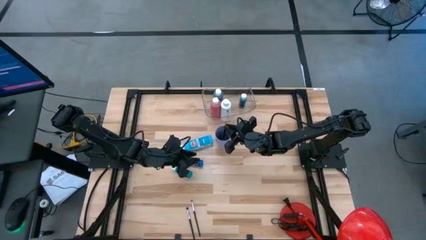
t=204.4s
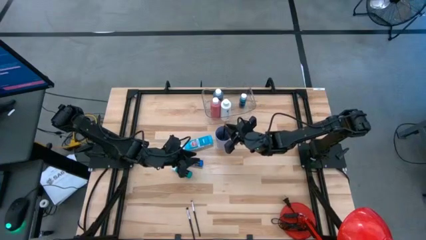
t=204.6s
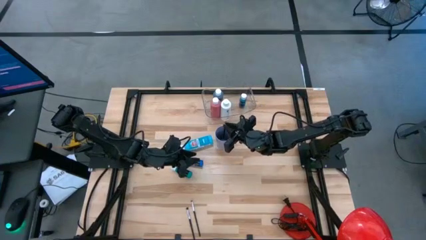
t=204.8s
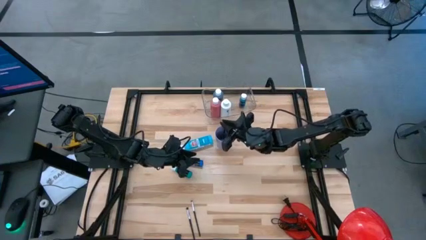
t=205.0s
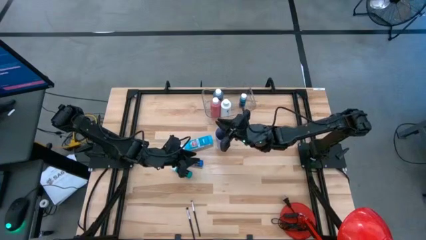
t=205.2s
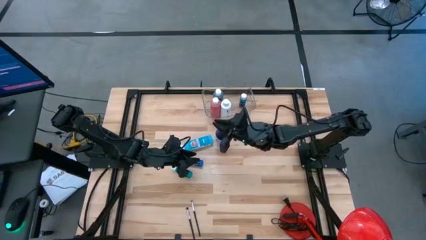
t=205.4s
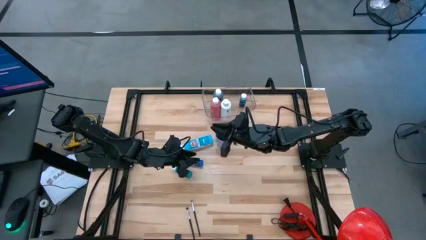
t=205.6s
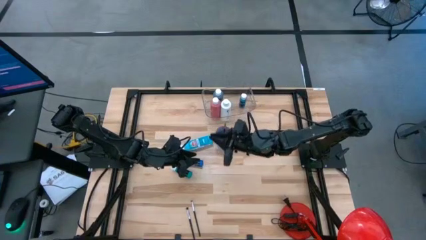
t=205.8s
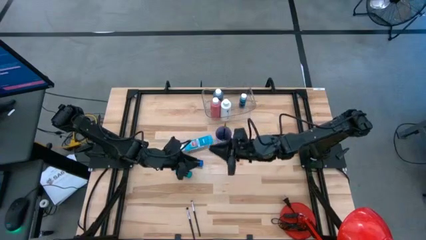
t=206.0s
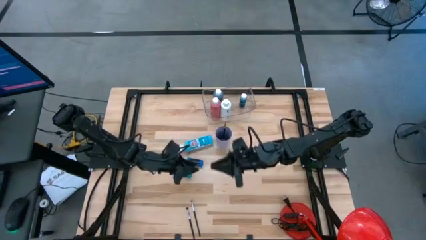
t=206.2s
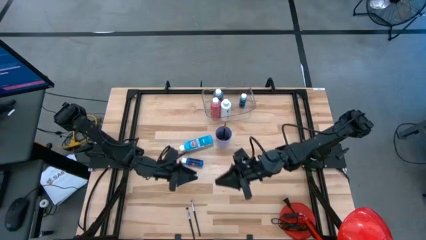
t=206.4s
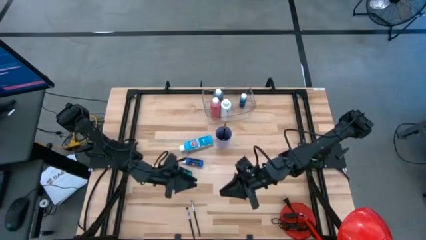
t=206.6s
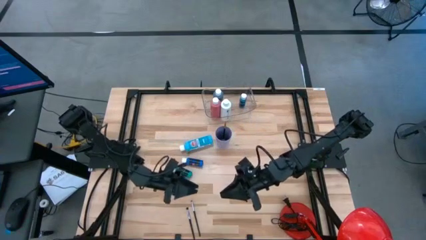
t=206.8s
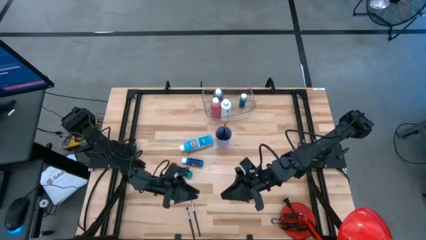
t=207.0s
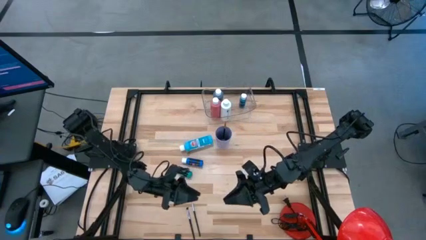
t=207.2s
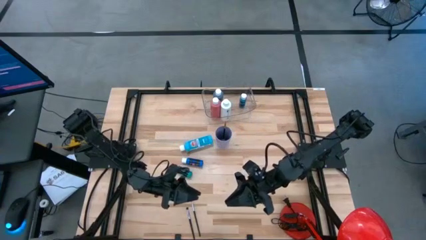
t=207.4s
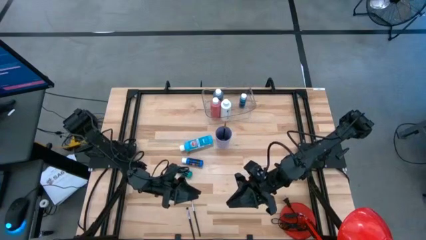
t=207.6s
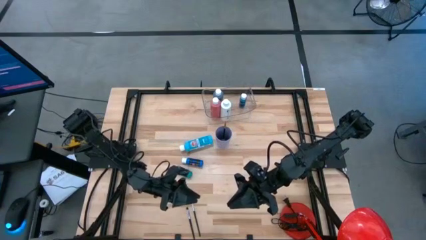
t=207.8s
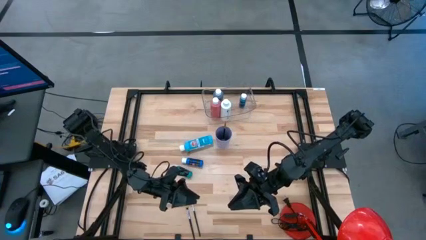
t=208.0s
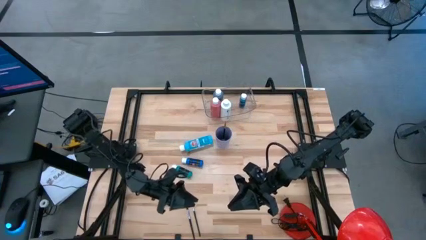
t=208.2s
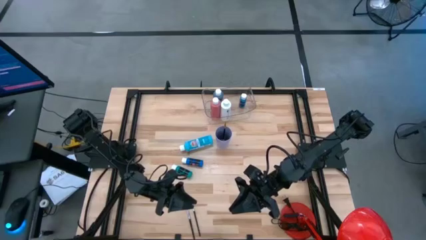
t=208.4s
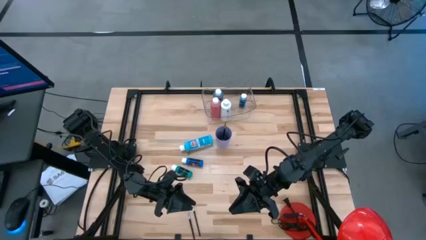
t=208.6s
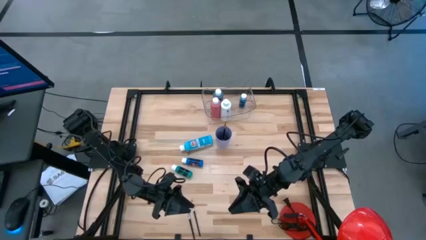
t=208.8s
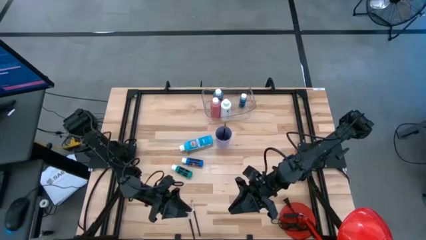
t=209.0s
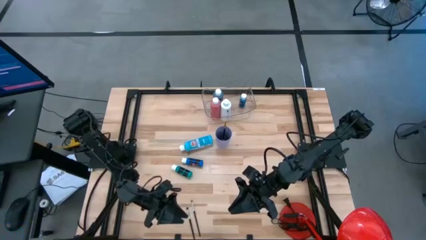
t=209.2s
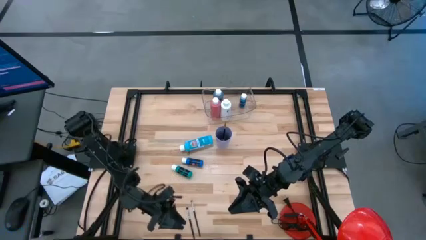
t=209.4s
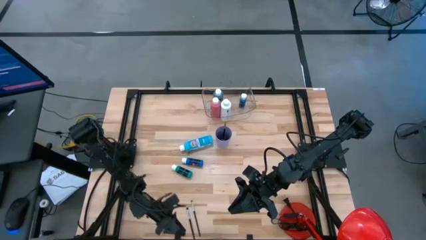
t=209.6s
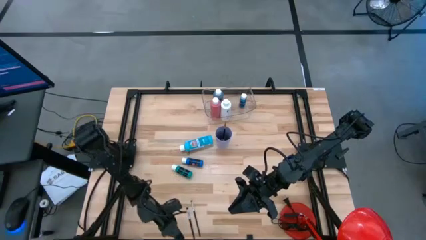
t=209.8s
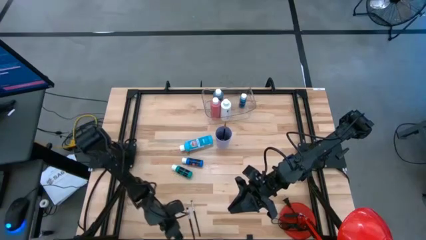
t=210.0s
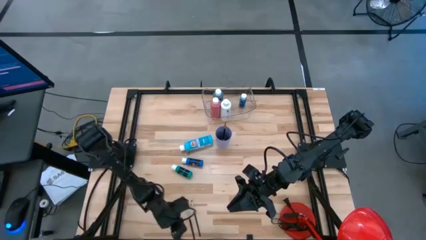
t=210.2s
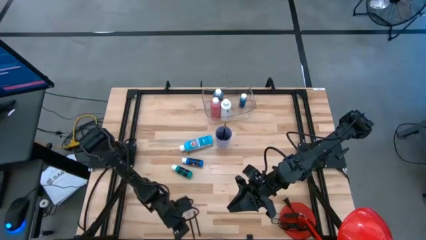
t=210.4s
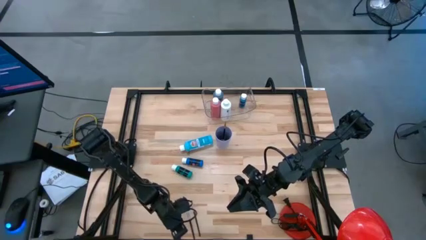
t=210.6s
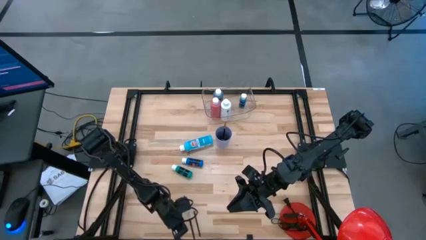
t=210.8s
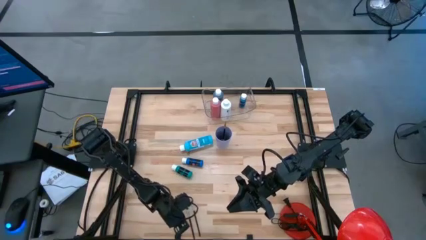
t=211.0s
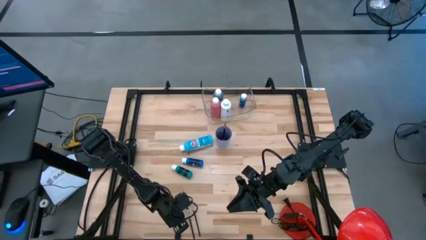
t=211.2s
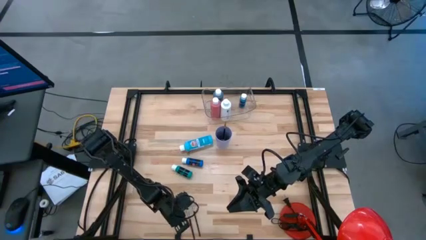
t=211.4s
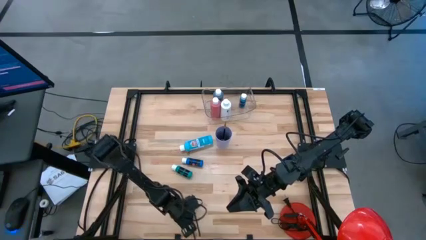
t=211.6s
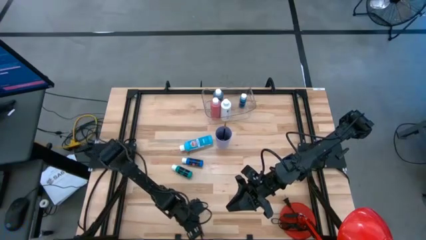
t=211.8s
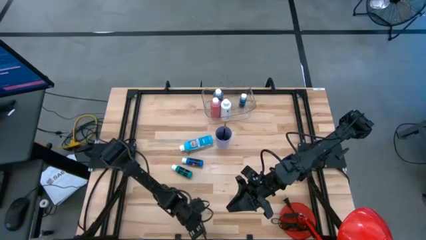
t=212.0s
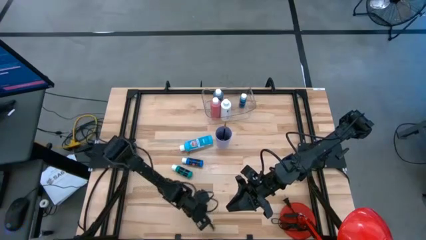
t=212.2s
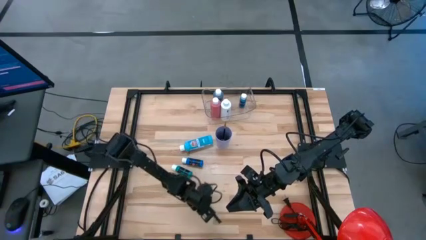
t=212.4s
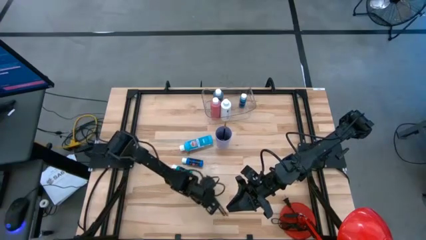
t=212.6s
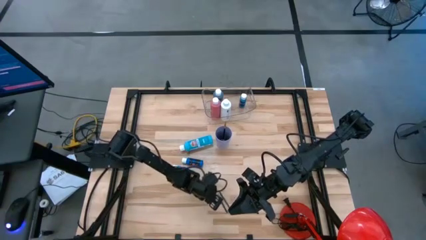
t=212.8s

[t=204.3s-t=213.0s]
Task: Pick & Place Paint Supplies
Move the black paint brushes to the center of the table

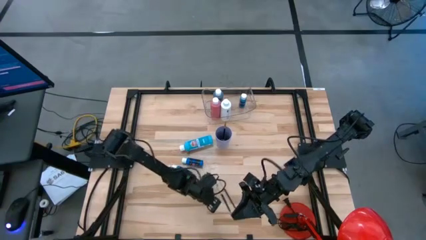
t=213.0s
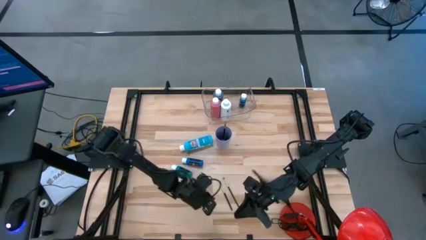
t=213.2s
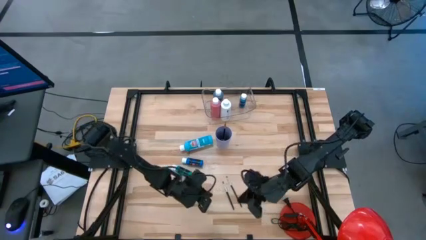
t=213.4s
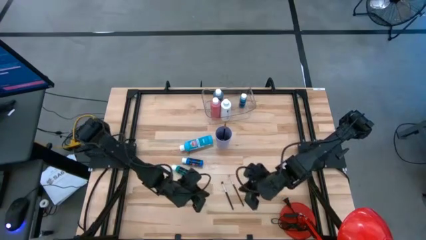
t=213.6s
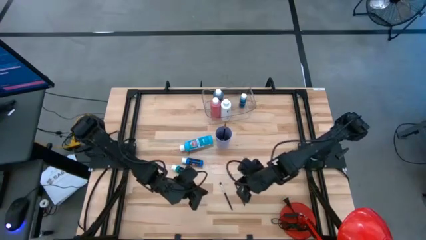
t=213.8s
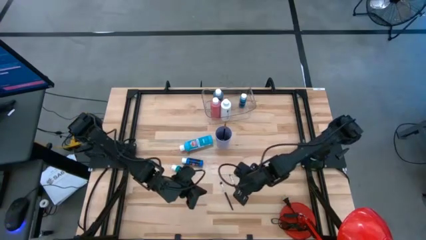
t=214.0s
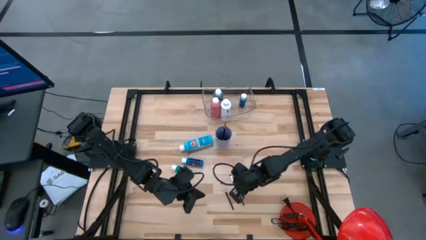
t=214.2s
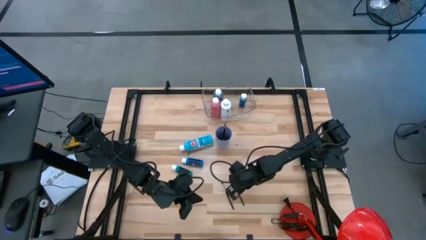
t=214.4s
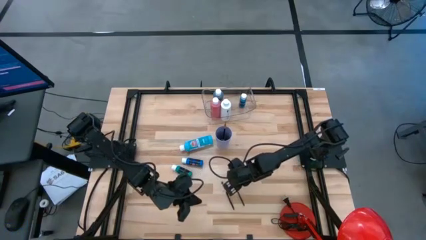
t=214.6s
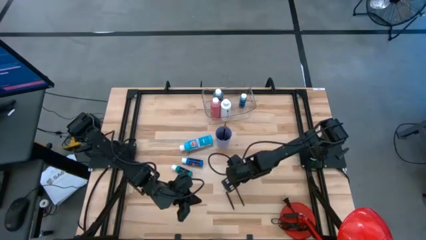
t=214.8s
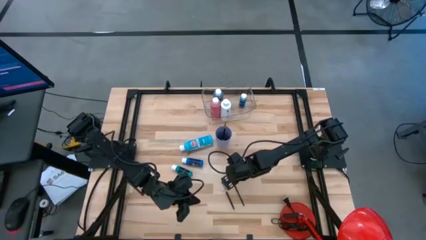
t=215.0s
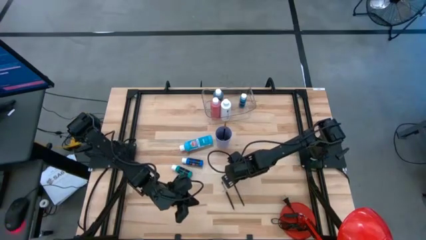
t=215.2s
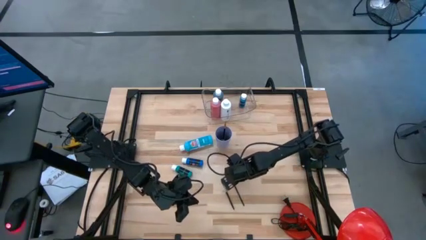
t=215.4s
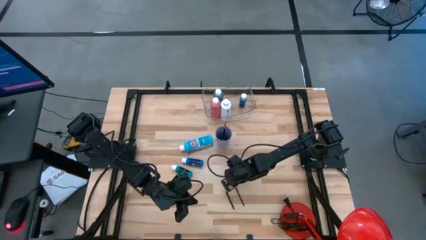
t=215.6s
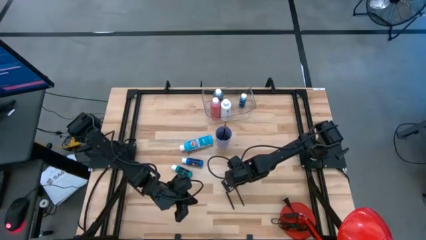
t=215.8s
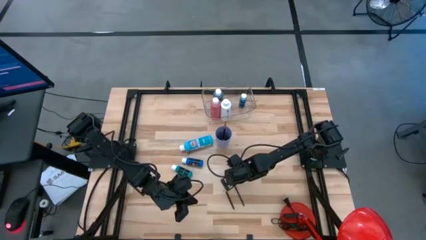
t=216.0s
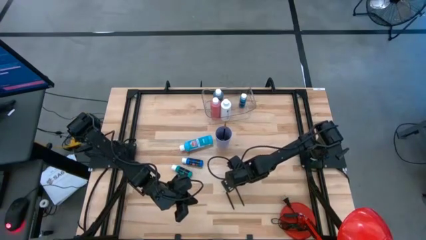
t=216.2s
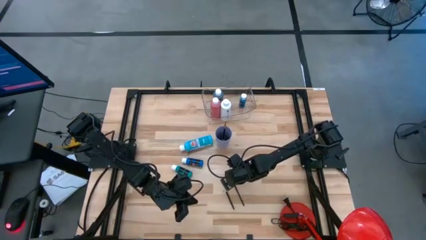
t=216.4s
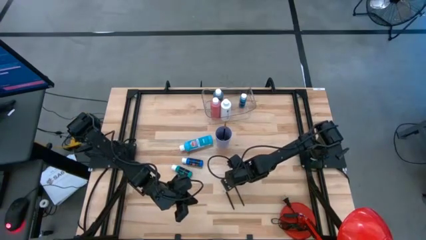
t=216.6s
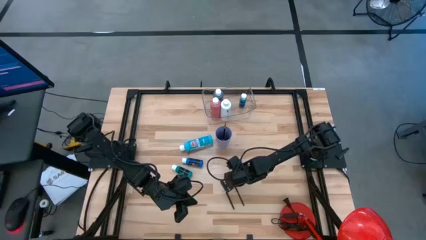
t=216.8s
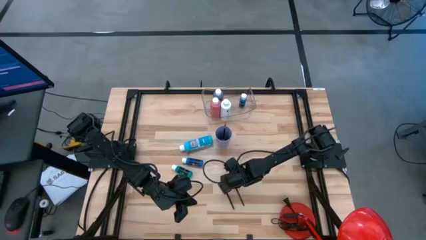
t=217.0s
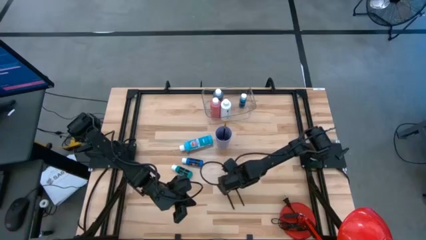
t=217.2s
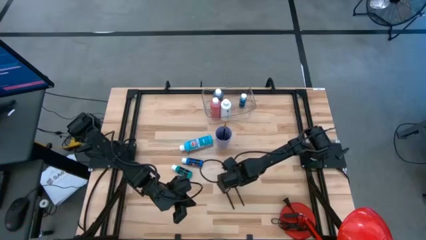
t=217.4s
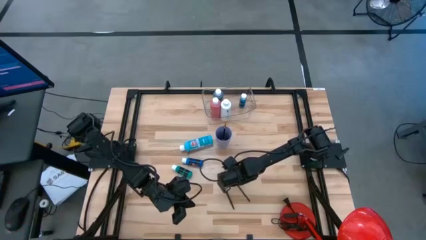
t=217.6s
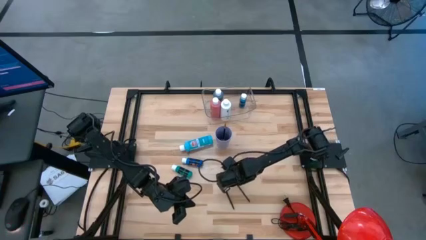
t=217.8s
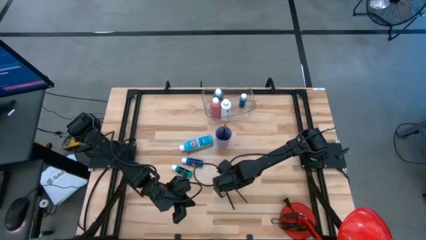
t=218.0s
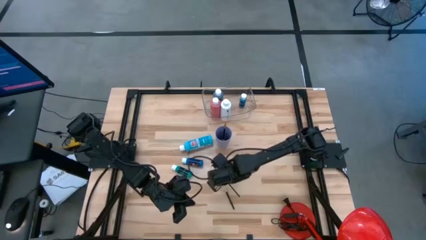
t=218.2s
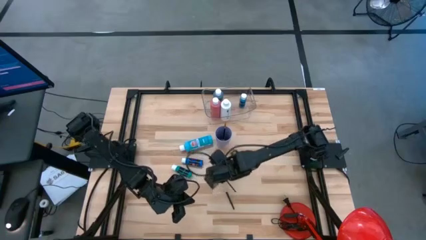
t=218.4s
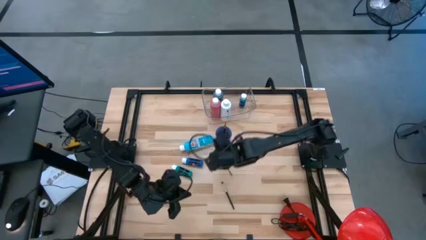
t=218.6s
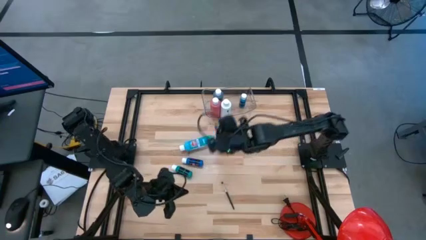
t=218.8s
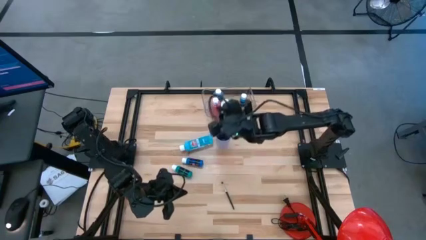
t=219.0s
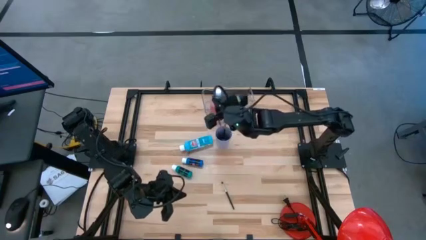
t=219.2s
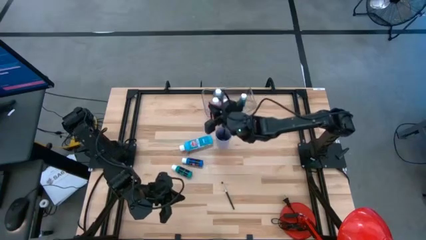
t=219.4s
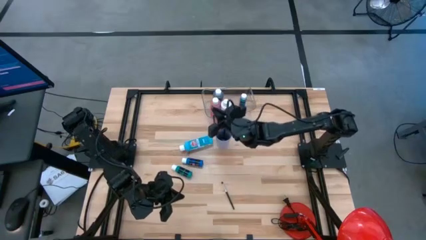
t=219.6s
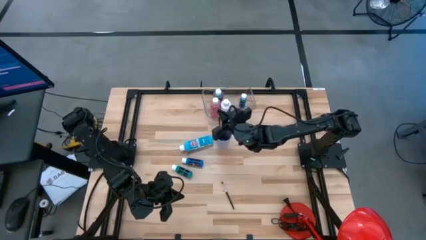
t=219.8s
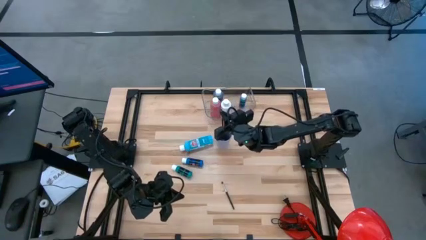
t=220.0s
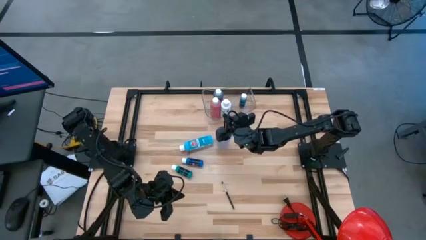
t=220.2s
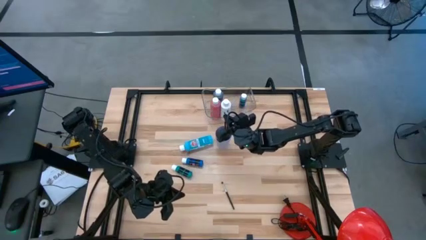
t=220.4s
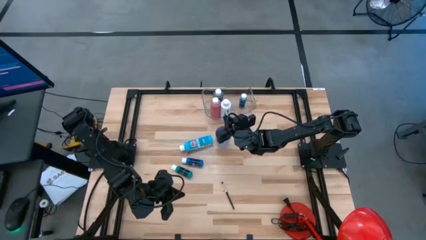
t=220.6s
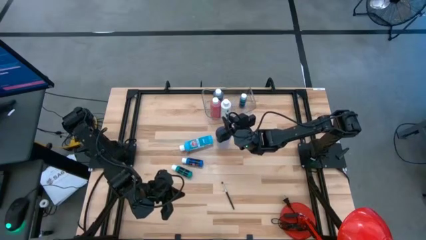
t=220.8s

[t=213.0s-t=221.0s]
Put the black paint brush into the violet cup
